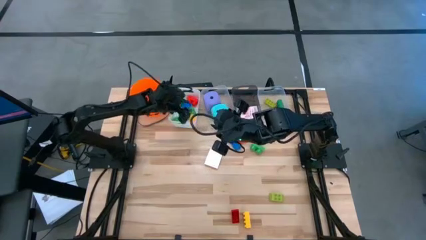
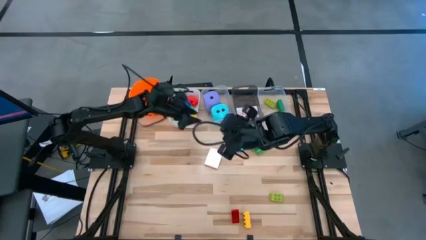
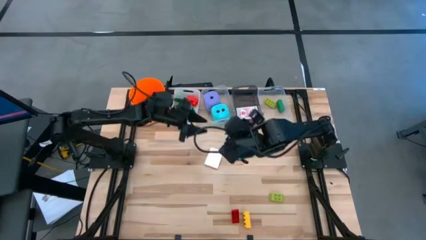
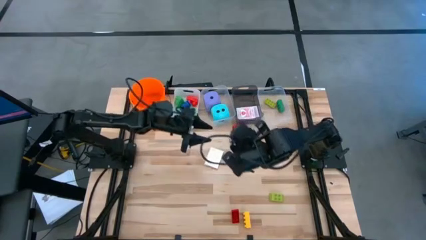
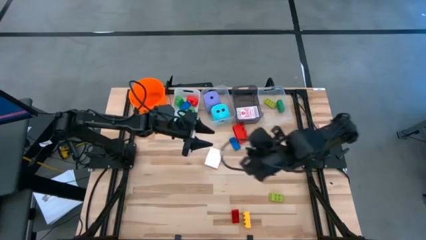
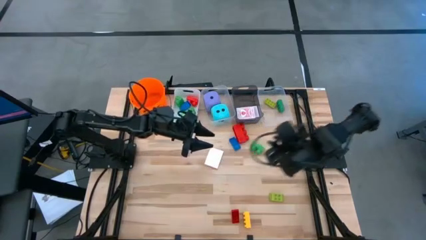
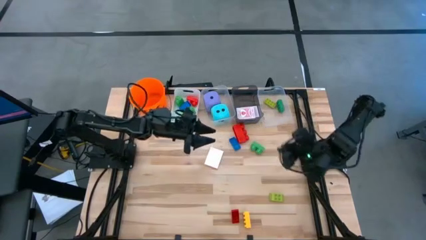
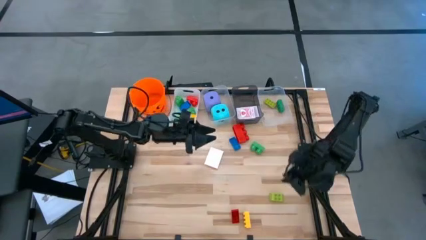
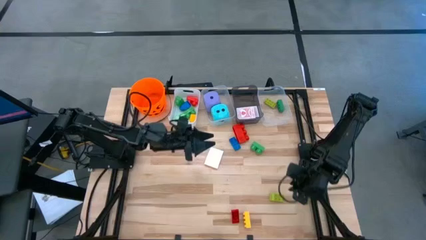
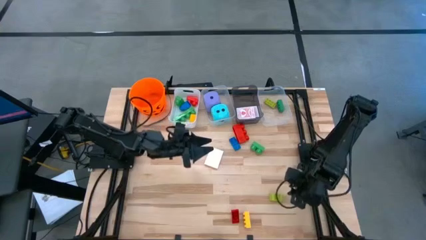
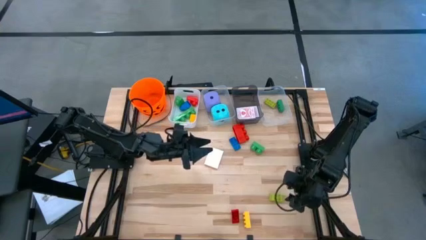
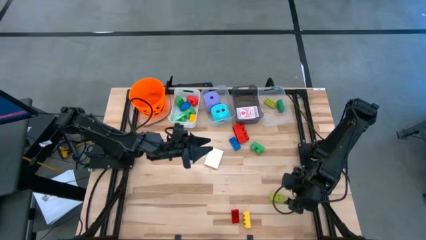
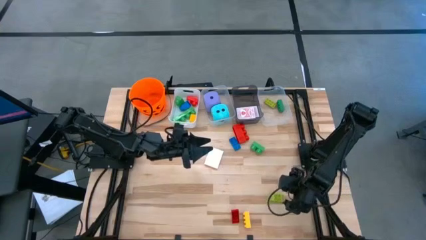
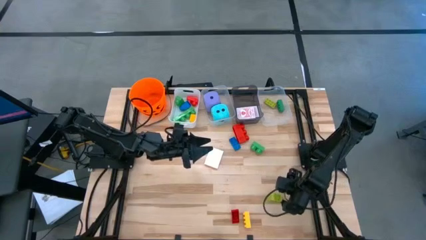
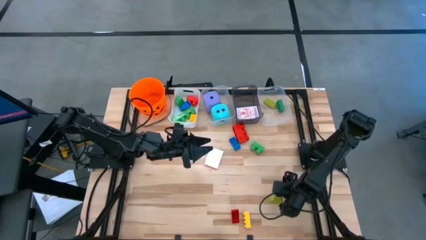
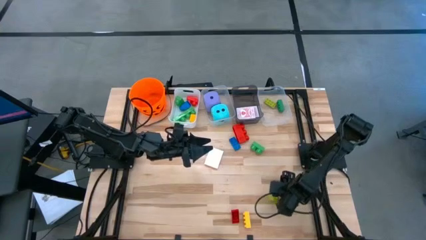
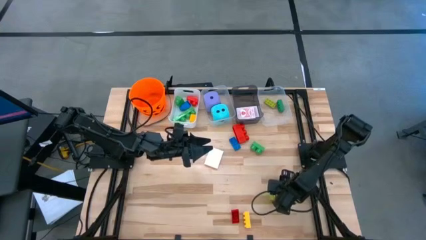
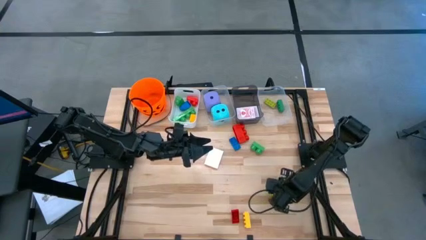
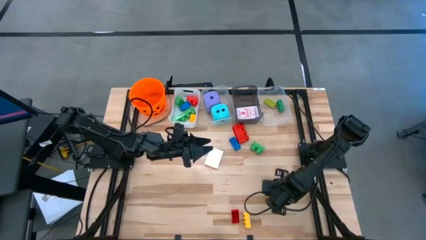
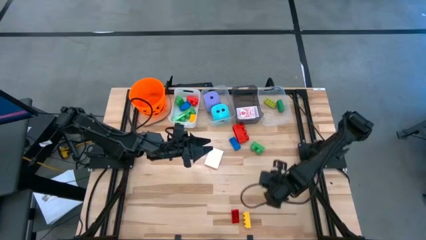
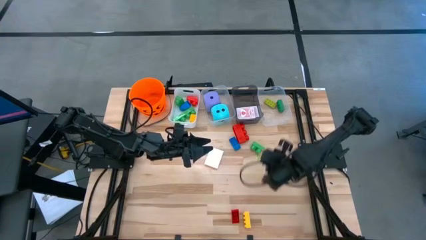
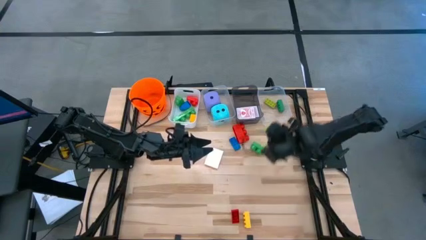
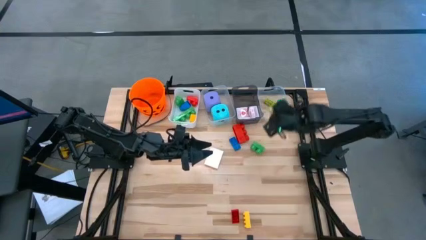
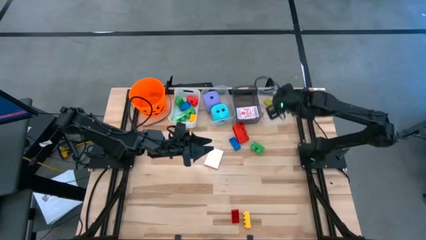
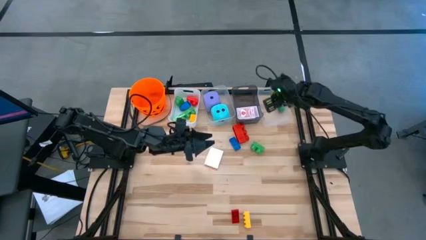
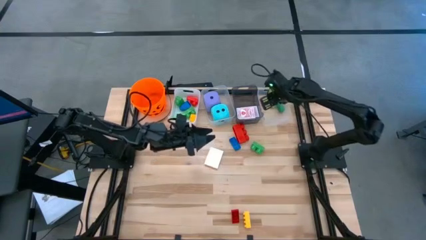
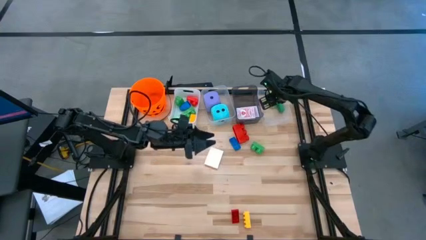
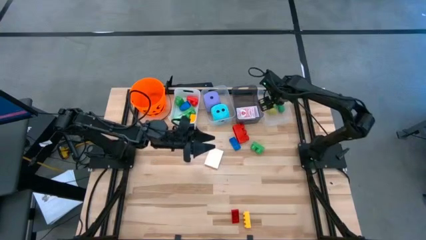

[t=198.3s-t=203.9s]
Task: Pick & Place Toys
Put the light green game piece into the right transparent bin

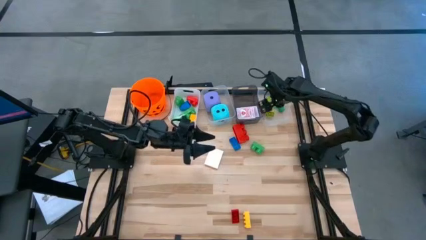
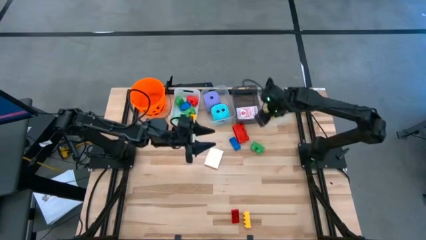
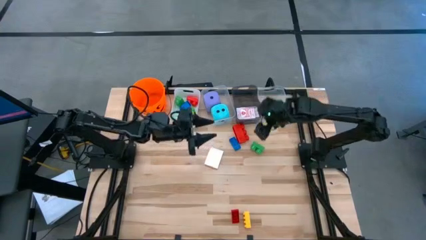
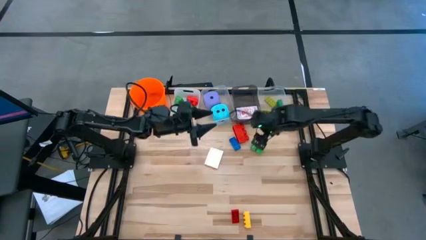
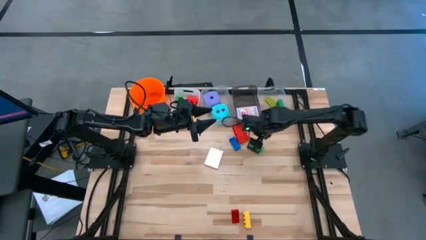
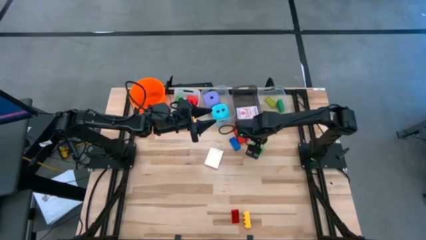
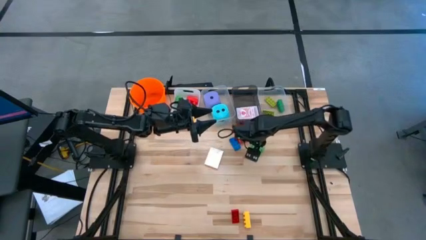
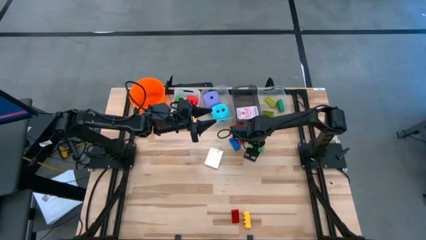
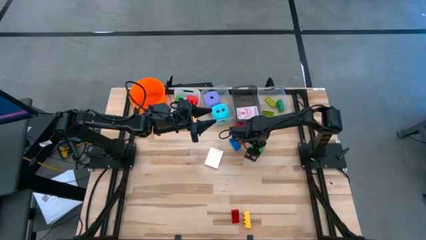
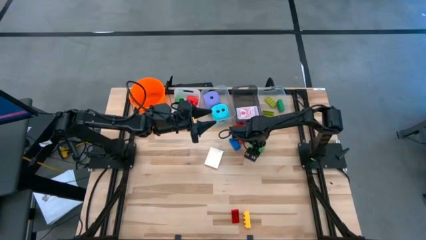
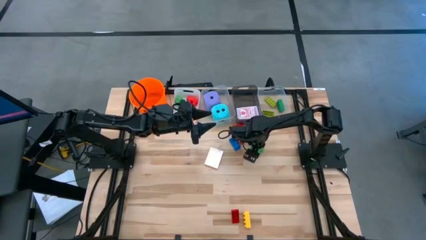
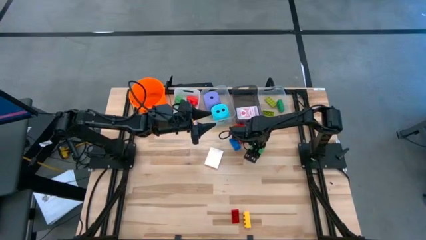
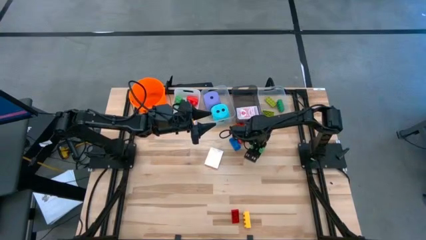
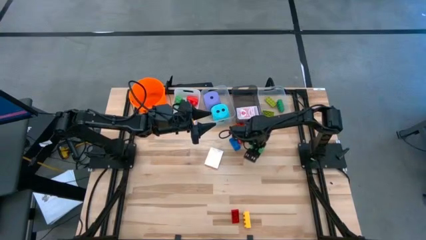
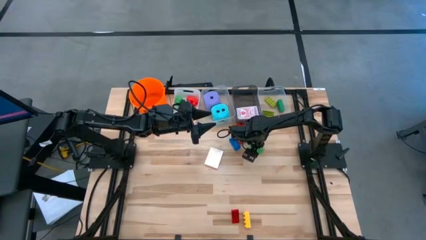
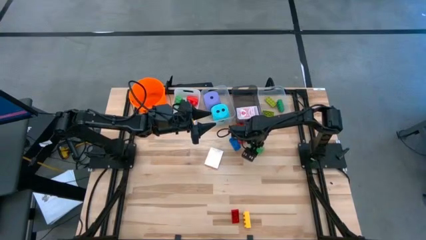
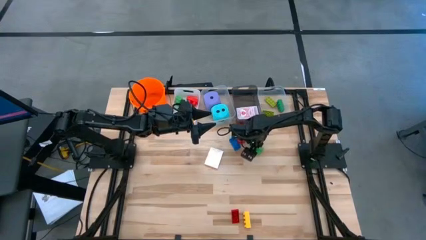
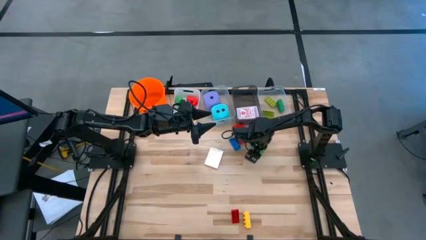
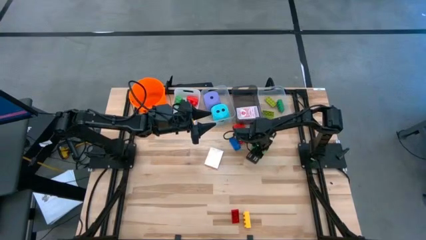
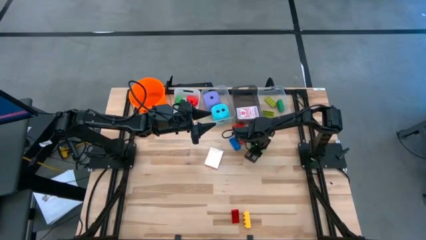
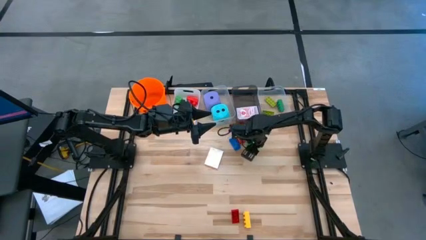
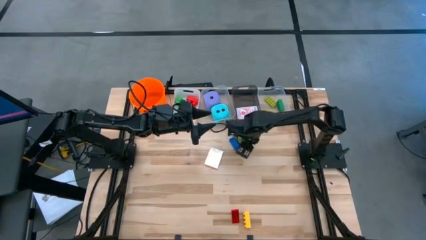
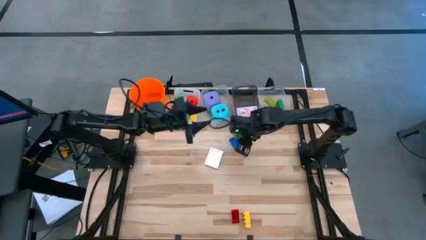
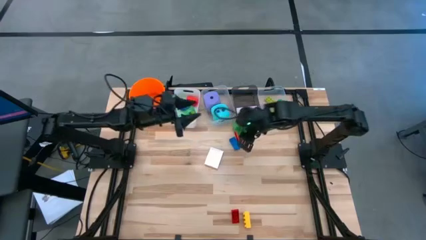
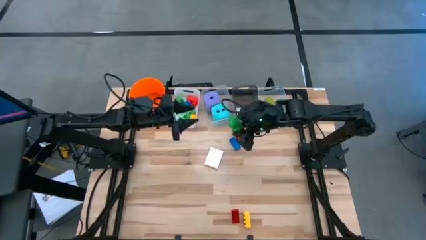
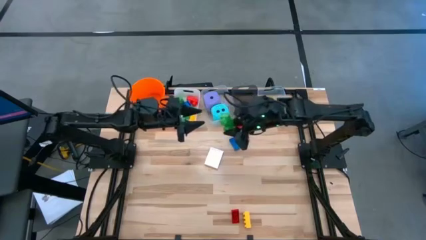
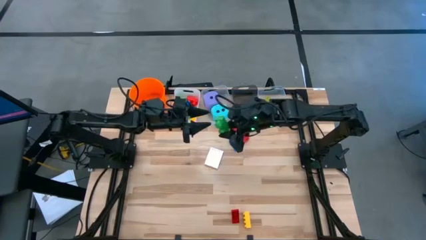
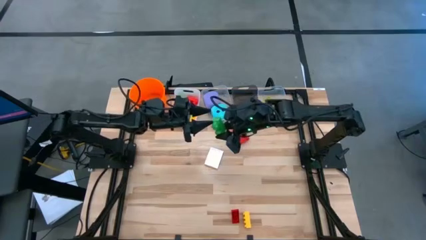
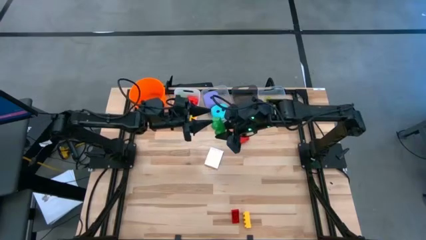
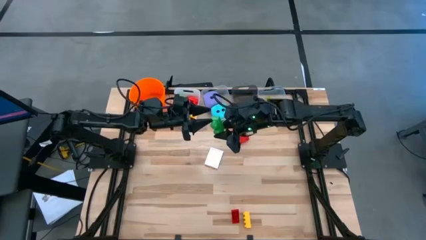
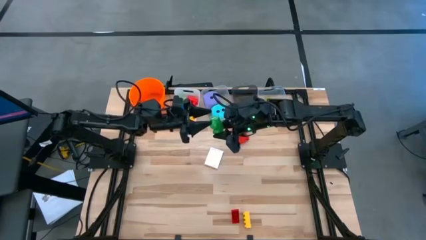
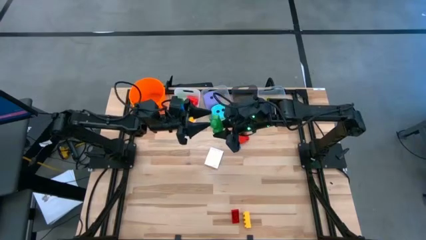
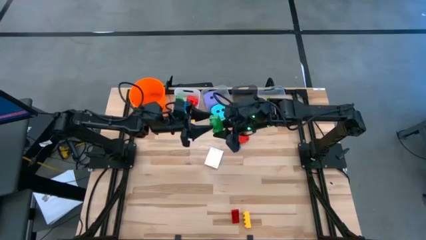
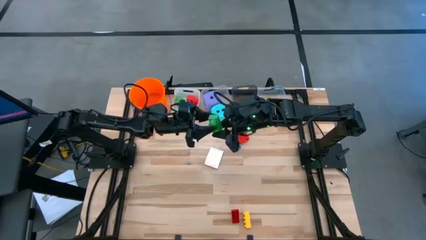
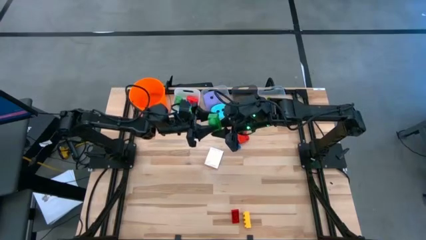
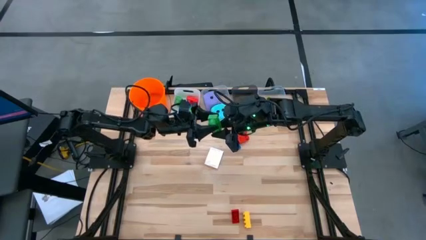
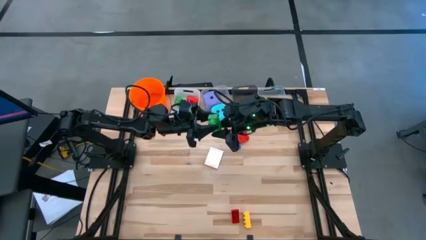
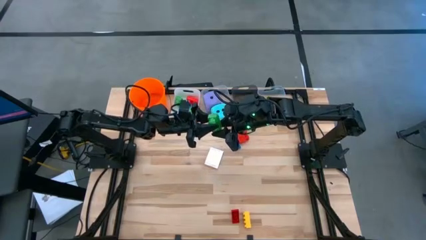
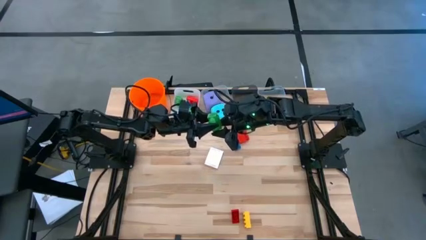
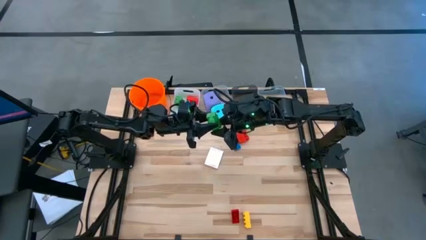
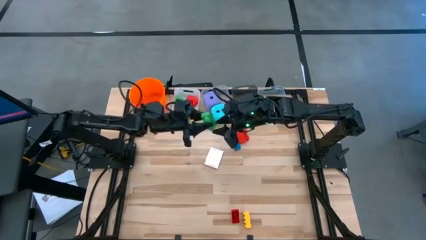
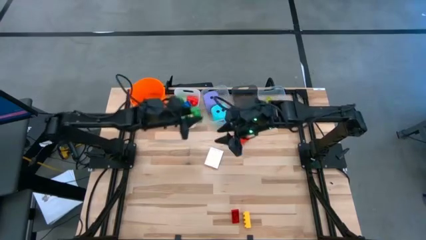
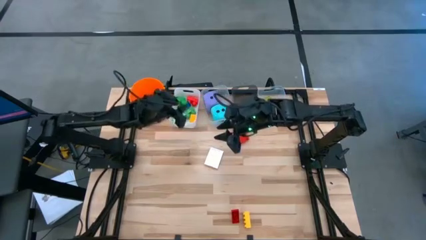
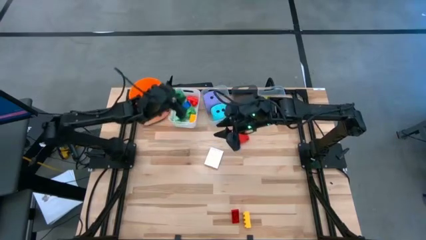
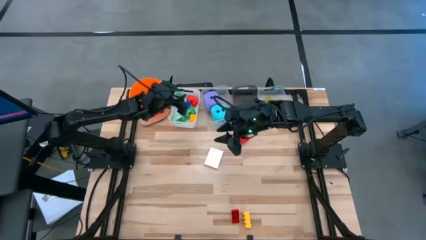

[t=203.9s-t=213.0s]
Put the 2 stud green game piece into the white bin

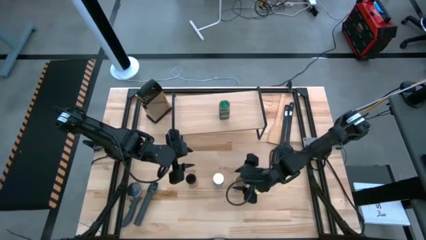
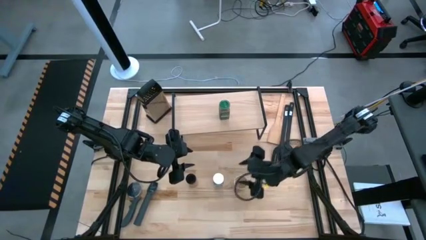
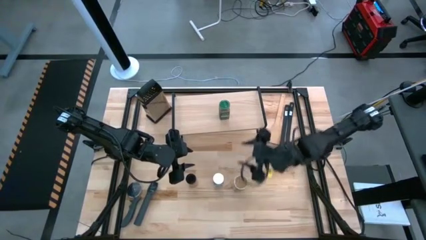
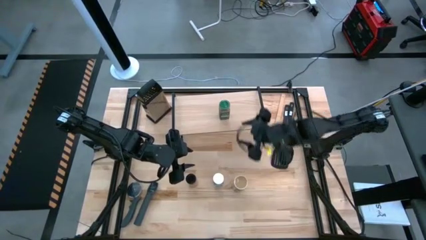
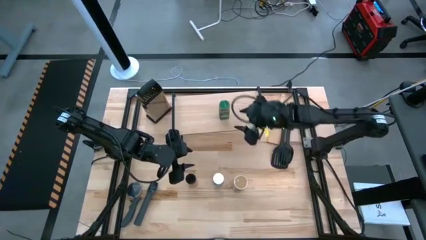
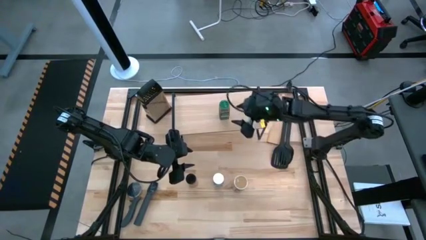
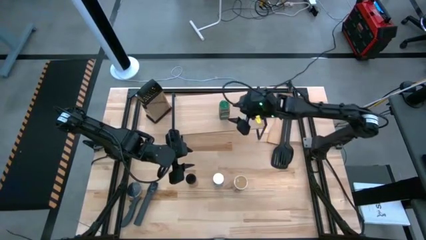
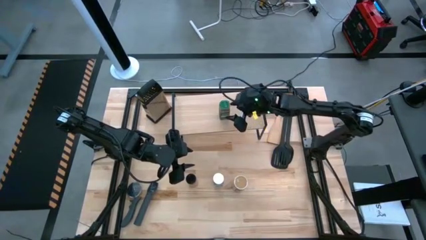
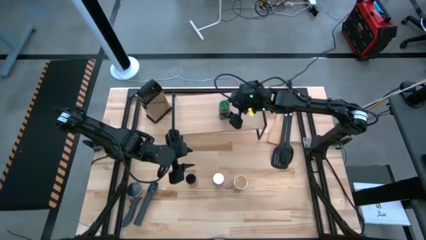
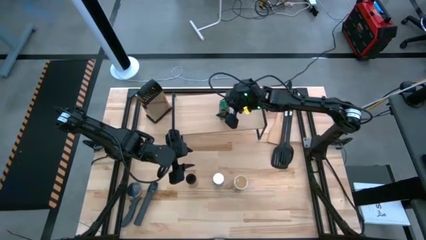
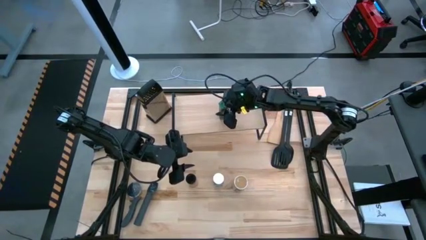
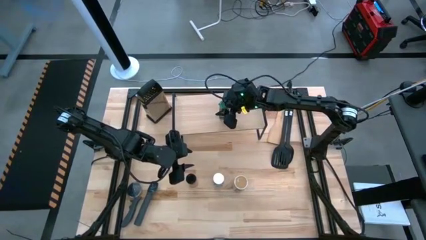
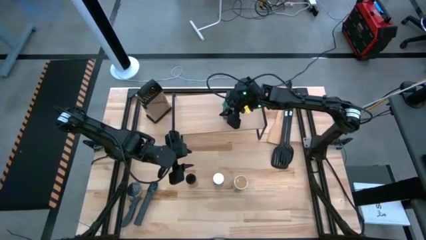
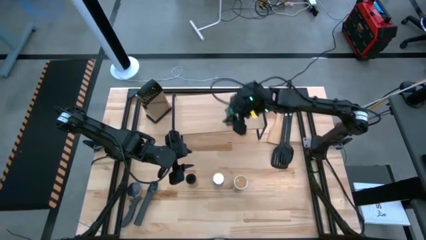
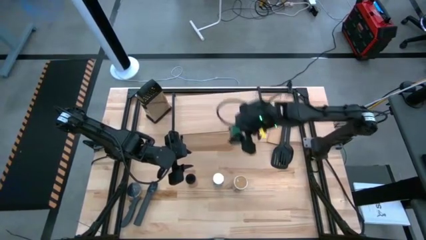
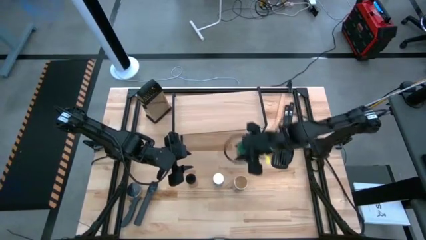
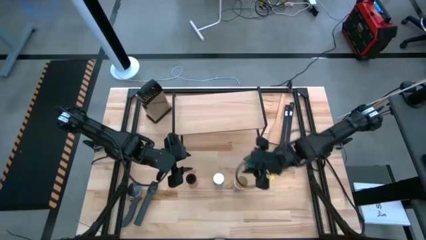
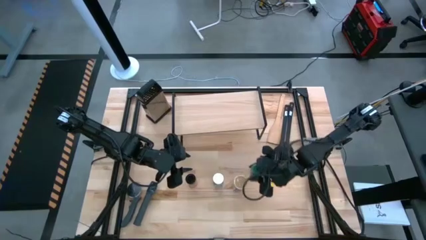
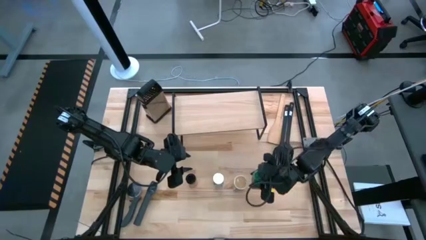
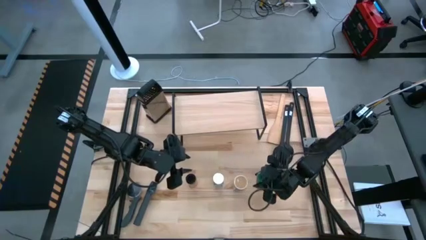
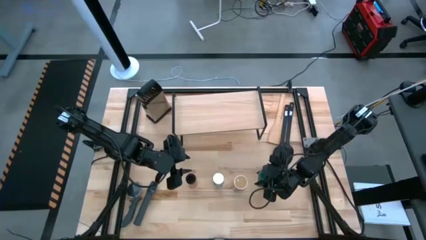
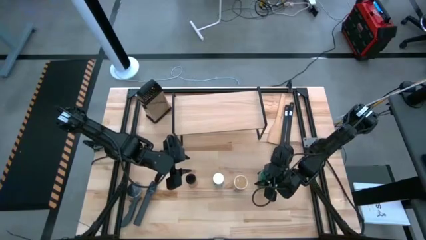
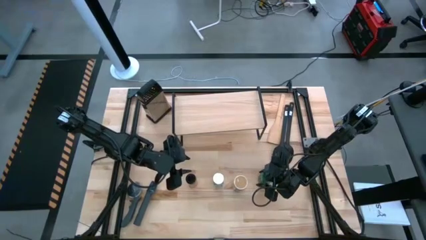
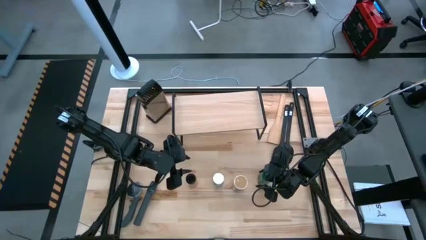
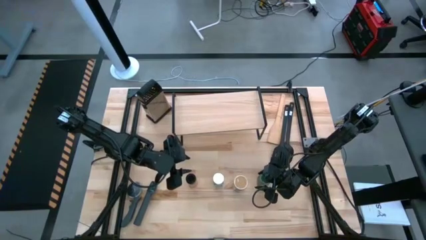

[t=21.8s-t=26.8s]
Task: Shelf spices
Remove the green seasoning bottle from the shelf
